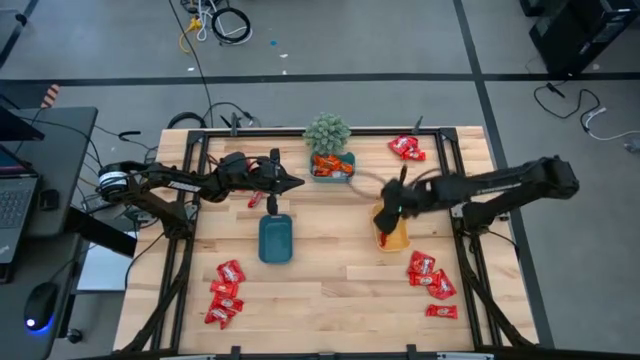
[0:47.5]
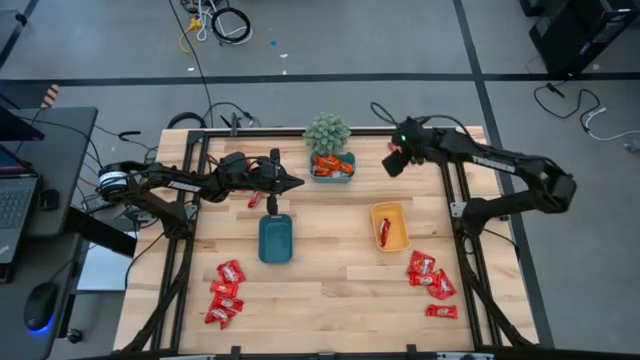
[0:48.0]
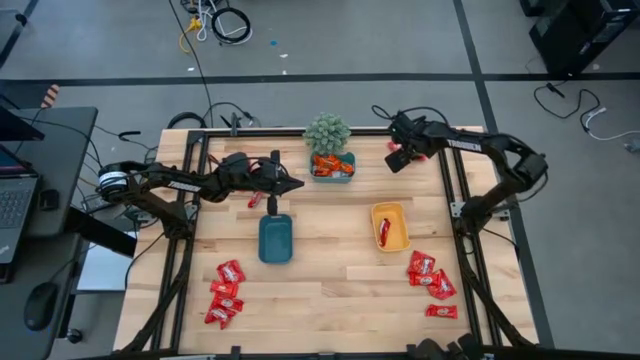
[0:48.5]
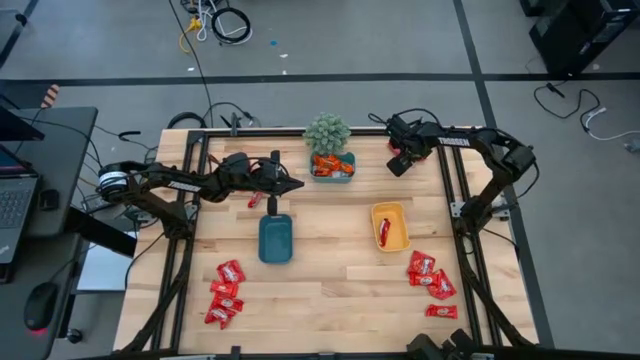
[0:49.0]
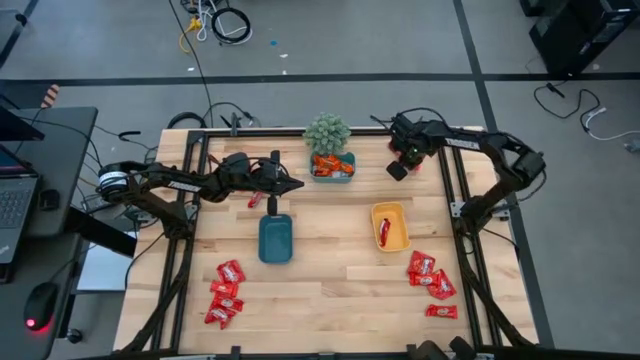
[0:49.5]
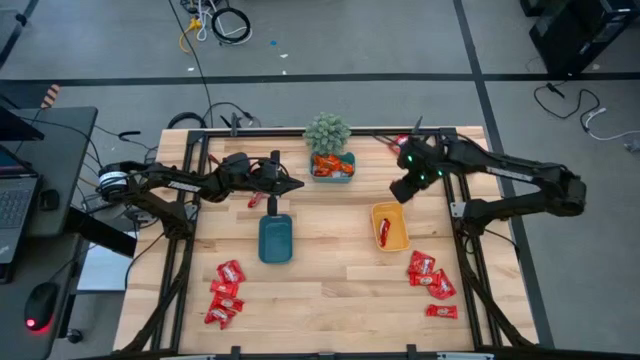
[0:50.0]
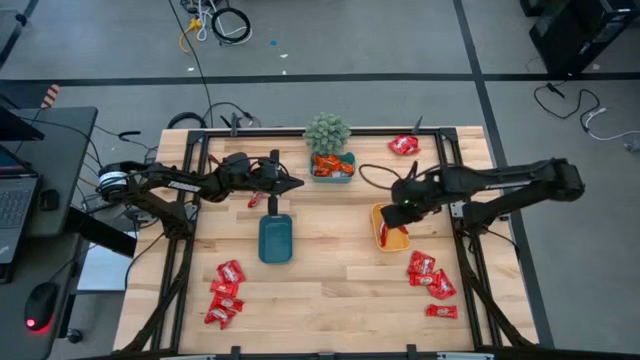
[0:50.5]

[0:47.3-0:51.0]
Task: Sort candy
Put the red chocolate into the yellow bin

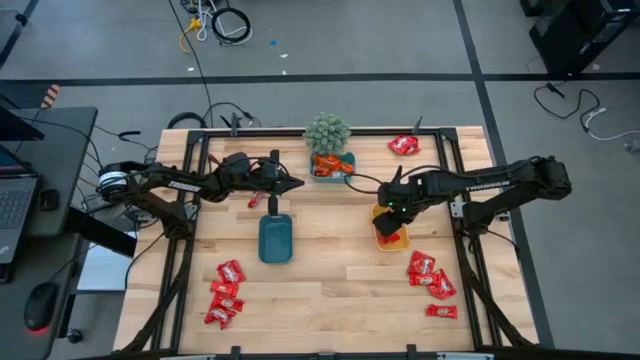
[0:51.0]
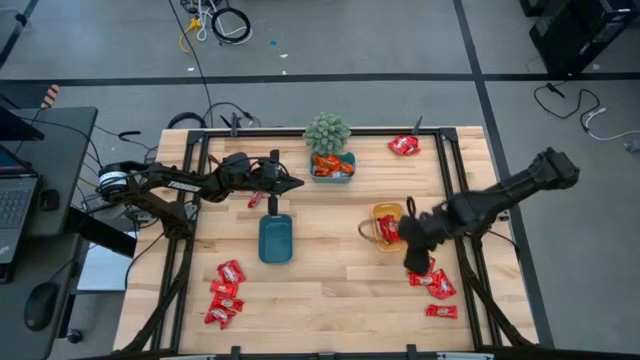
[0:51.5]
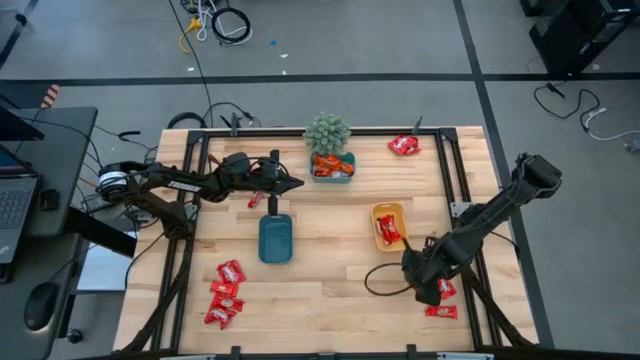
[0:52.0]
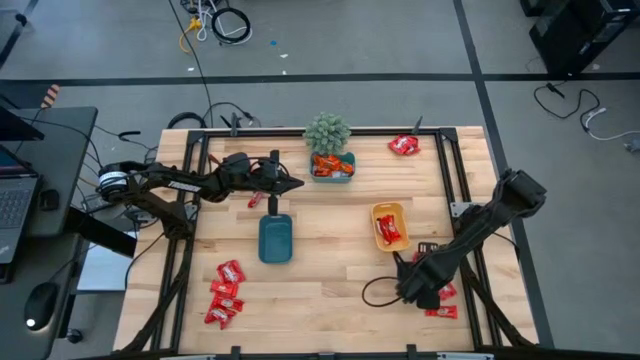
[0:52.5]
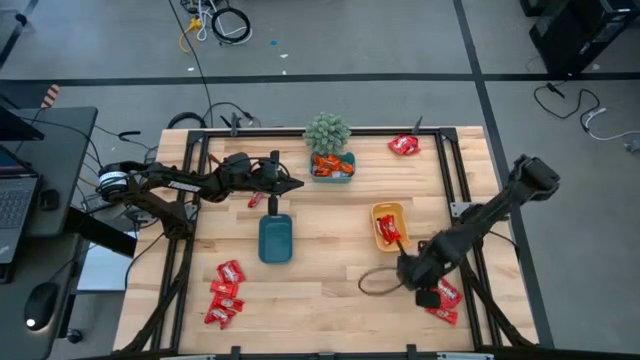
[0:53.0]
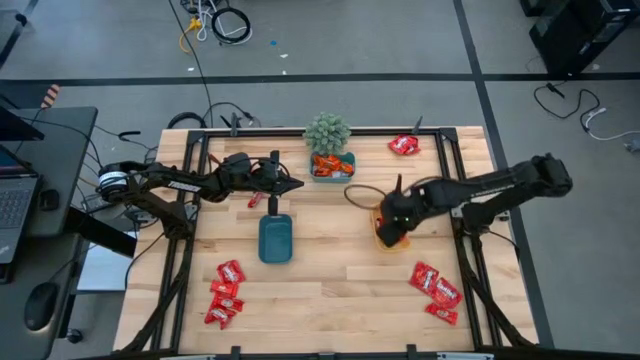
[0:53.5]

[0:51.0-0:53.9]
Put the red chocolate into the yellow bin

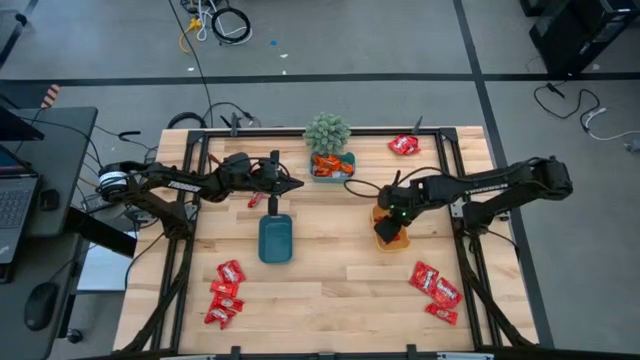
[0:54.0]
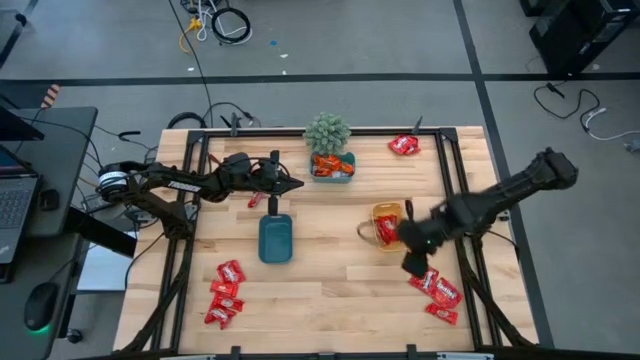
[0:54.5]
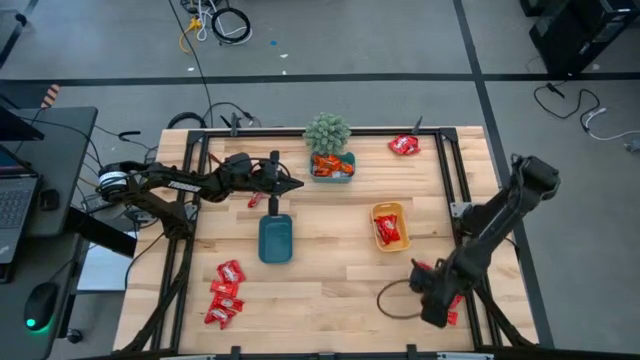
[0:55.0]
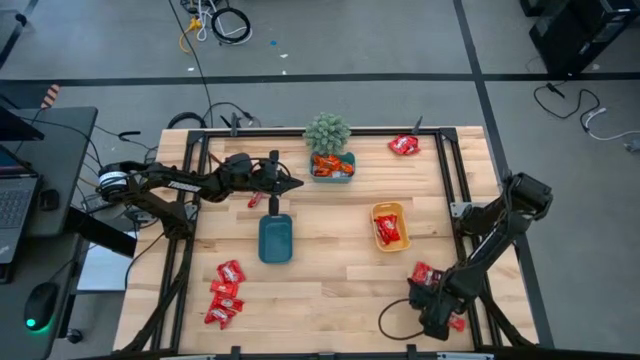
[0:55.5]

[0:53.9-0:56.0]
Put the red chocolate into the yellow bin

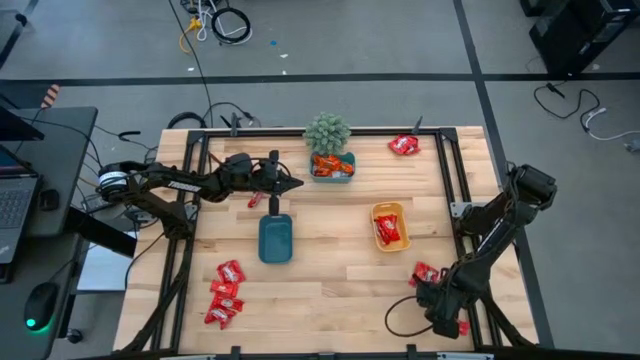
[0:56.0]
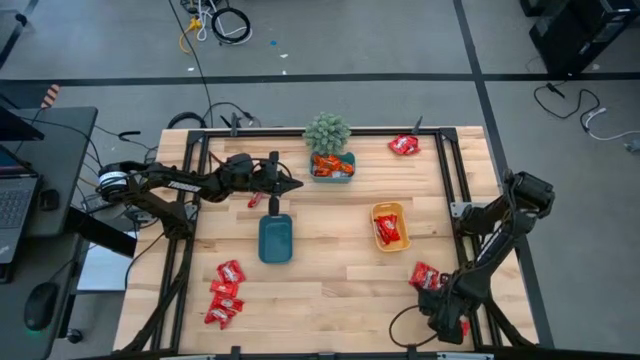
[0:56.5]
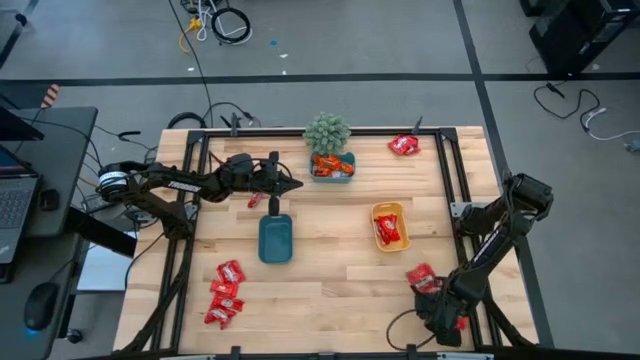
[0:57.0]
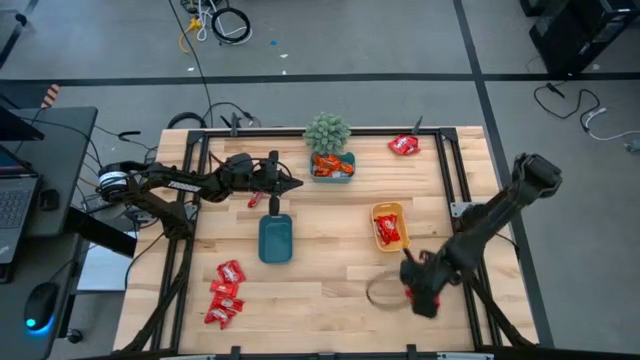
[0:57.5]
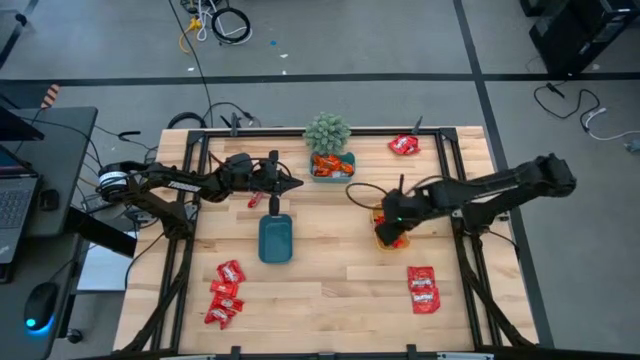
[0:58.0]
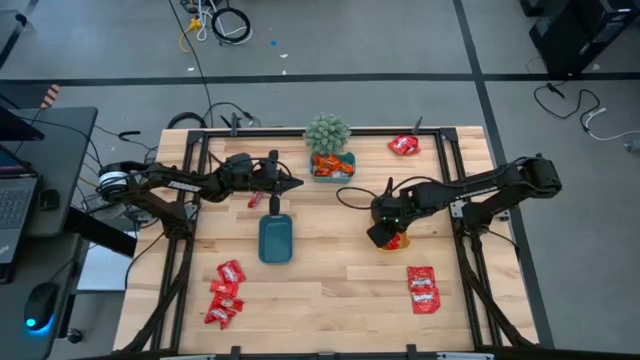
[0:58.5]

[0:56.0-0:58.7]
Put the red chocolate into the yellow bin

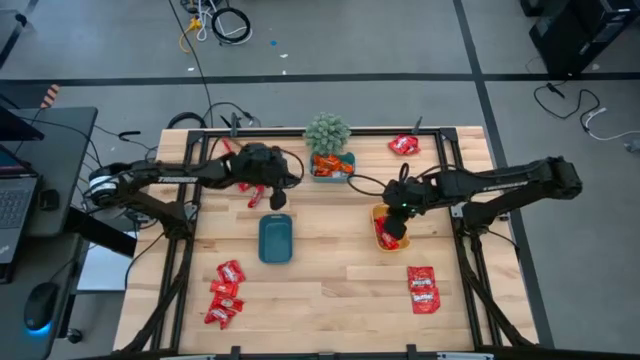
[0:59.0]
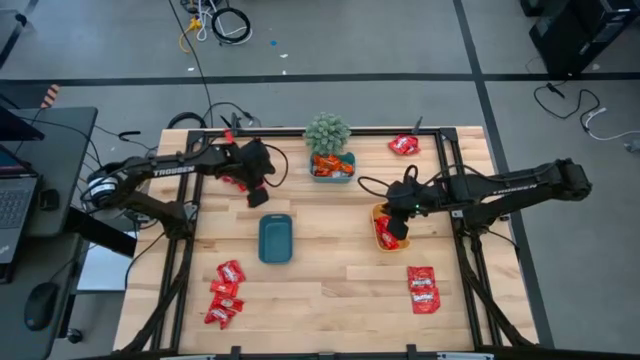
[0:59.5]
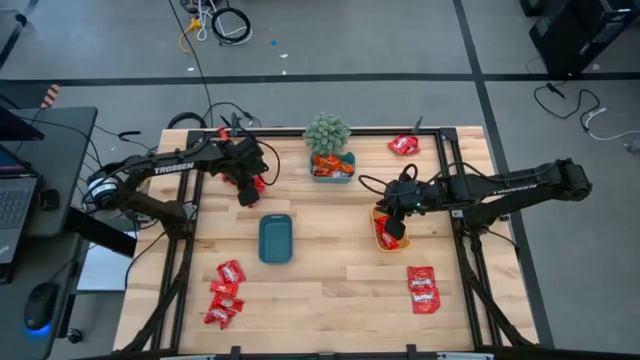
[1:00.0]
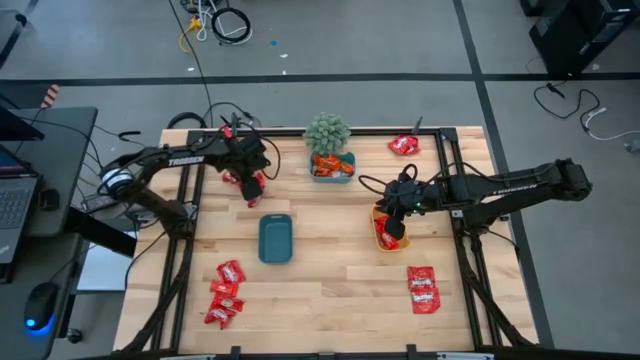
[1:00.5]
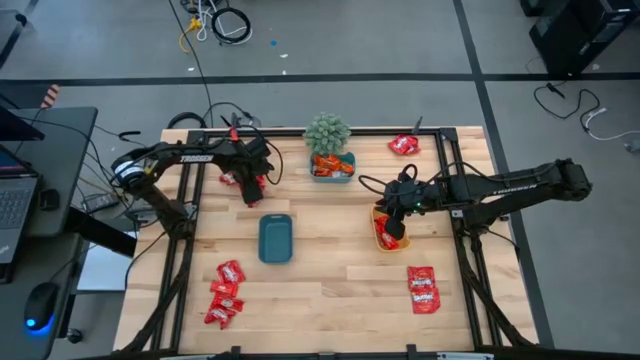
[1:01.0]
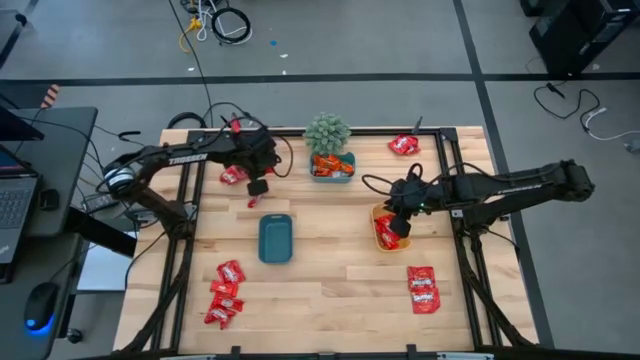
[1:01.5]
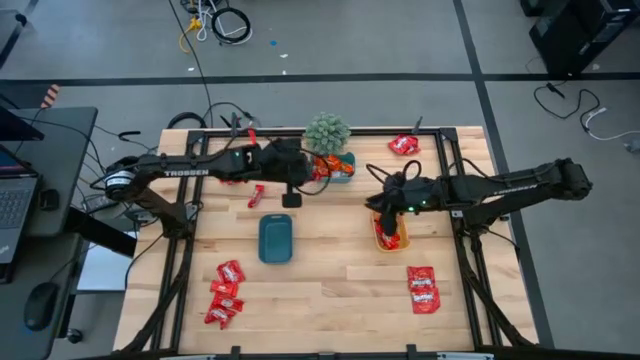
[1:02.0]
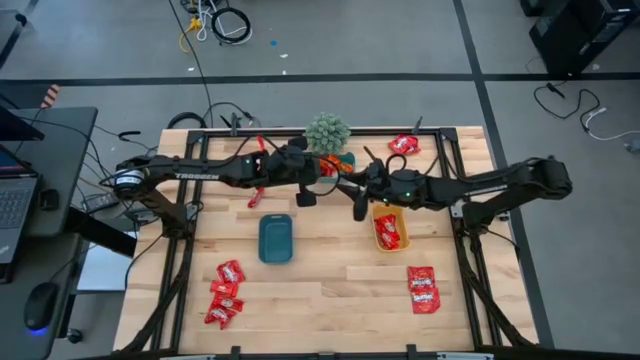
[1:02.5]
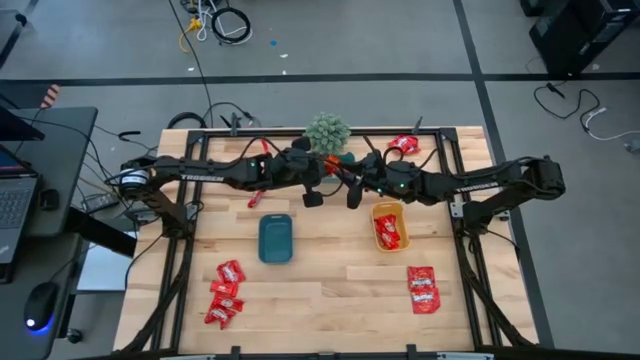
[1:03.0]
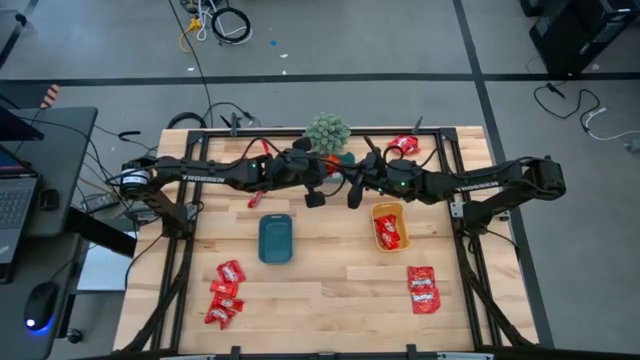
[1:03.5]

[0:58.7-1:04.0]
Put the red chocolate into the yellow bin

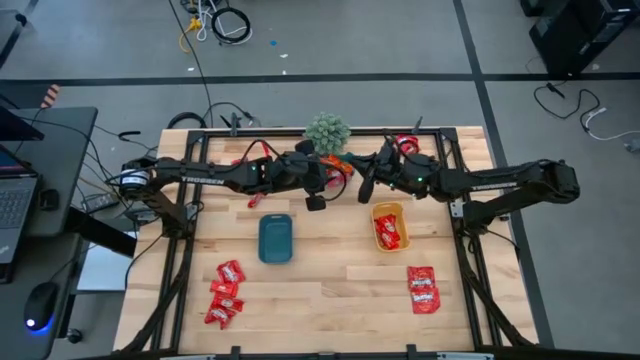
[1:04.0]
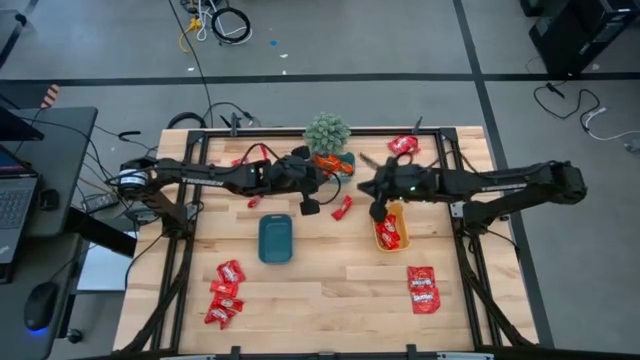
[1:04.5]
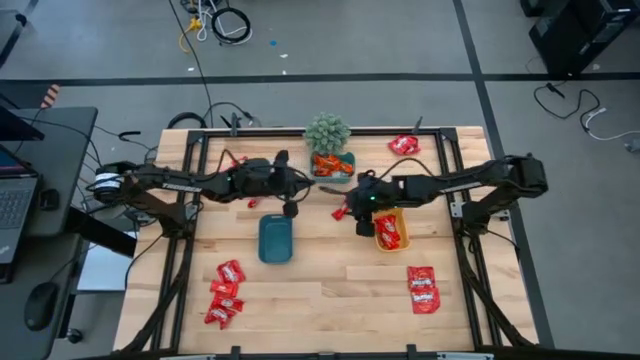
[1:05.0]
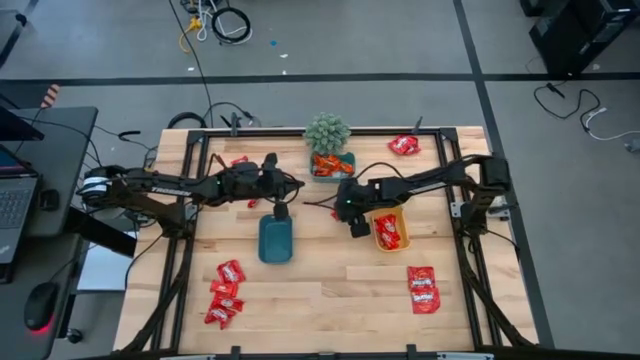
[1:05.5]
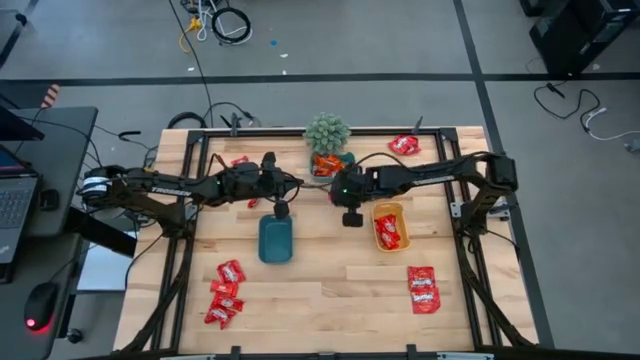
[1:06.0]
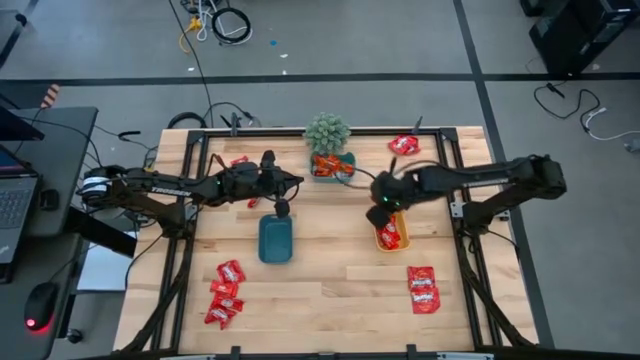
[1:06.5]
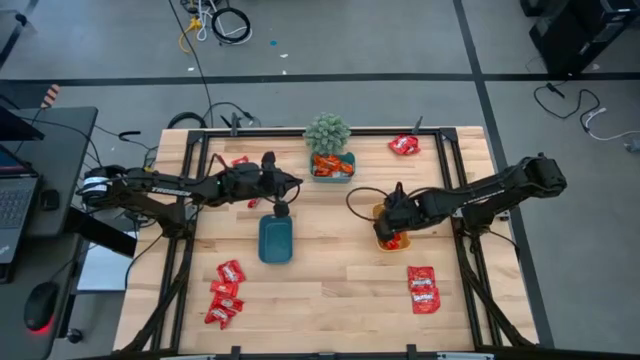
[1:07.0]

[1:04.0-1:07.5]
Put the red chocolate into the yellow bin

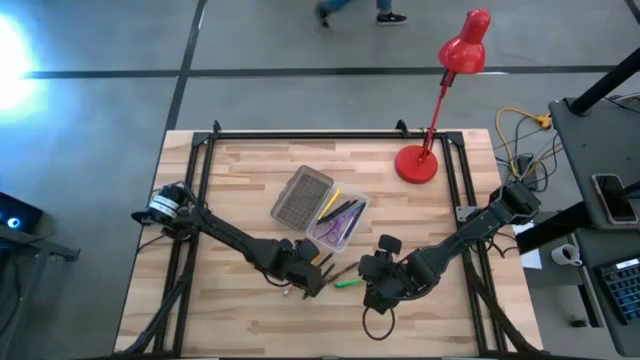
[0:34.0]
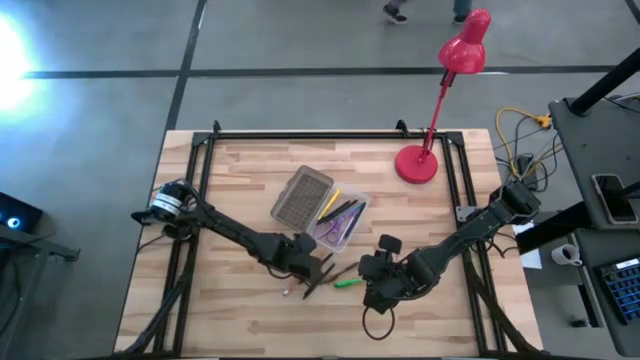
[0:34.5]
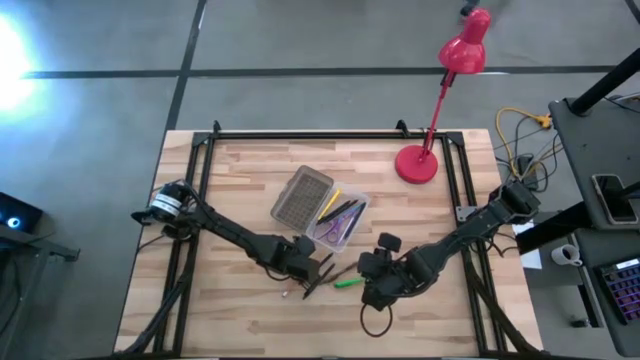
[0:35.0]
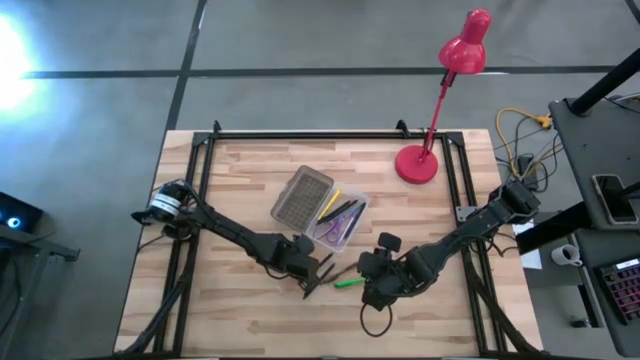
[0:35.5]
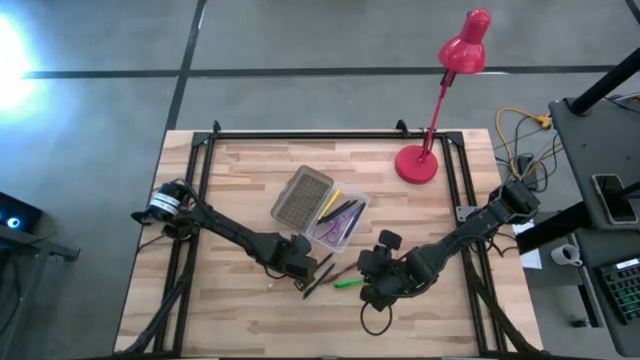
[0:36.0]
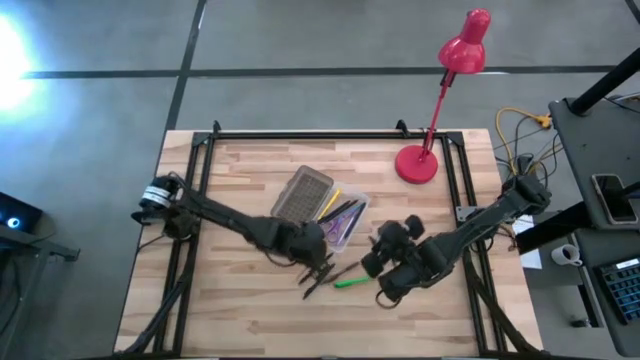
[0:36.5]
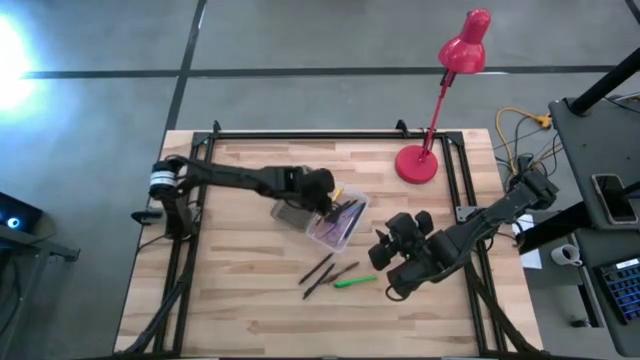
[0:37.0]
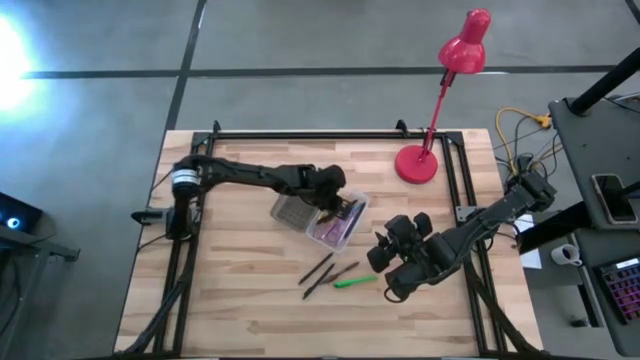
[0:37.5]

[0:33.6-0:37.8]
Task: Pick & place school supplies into a supply box
Put the yellow pencil into the gray supply box
